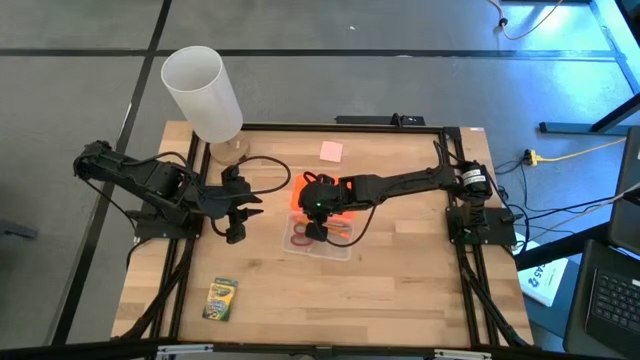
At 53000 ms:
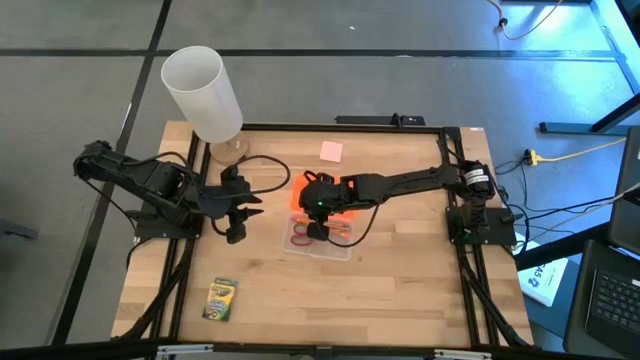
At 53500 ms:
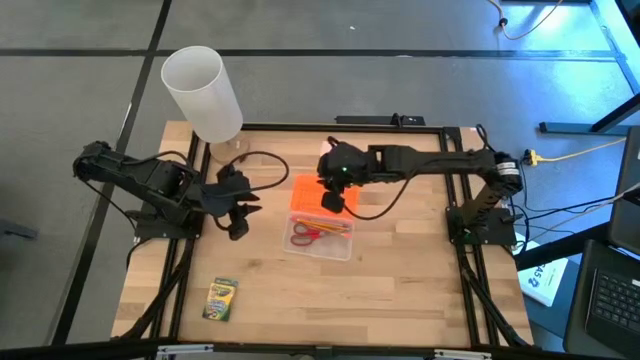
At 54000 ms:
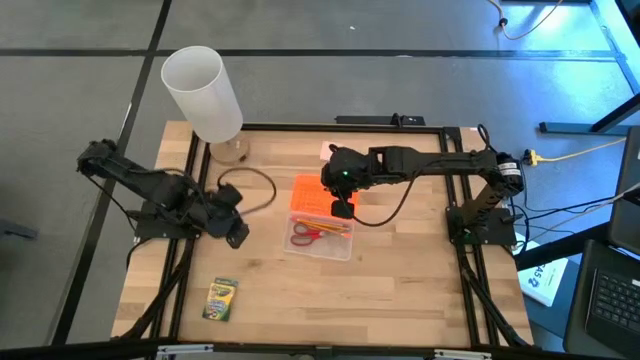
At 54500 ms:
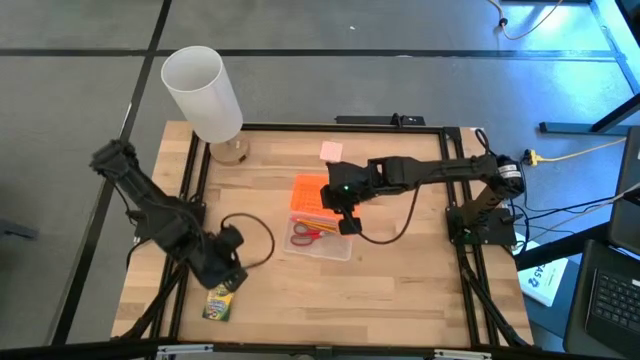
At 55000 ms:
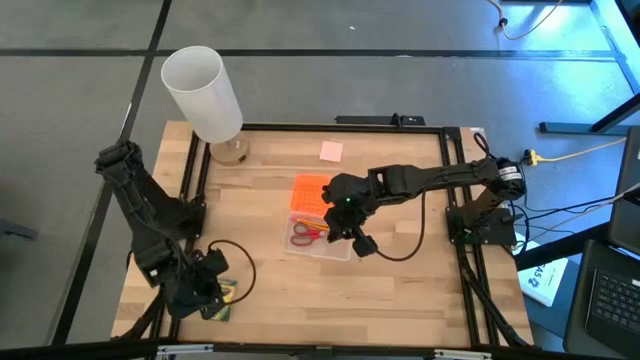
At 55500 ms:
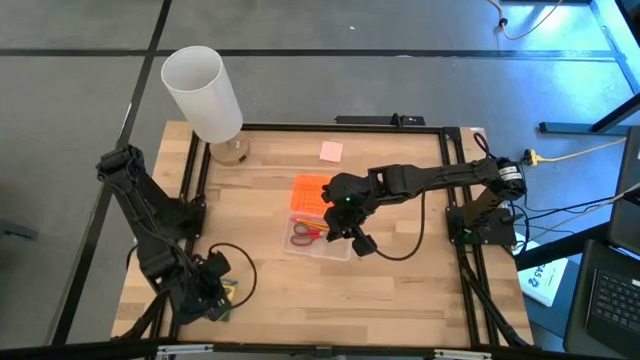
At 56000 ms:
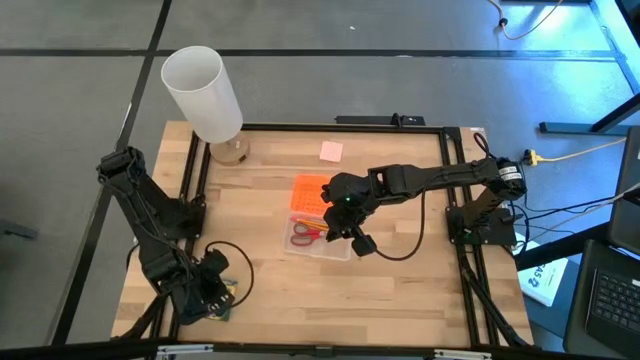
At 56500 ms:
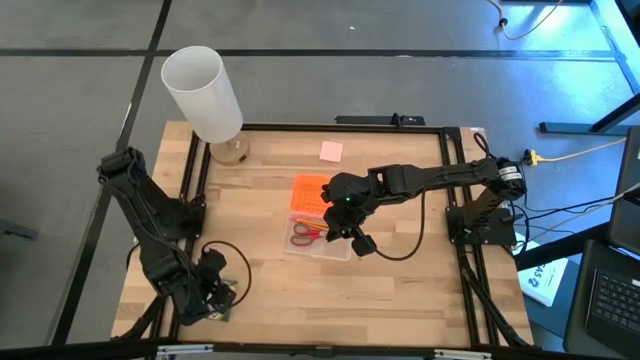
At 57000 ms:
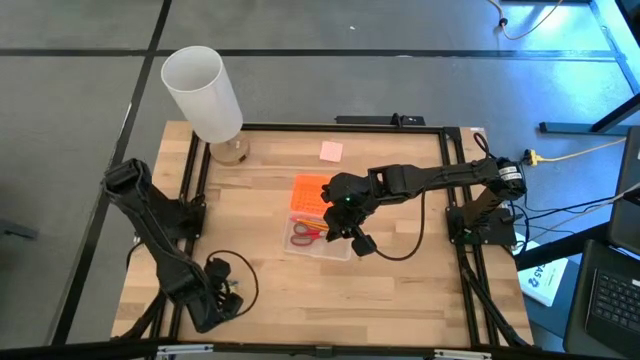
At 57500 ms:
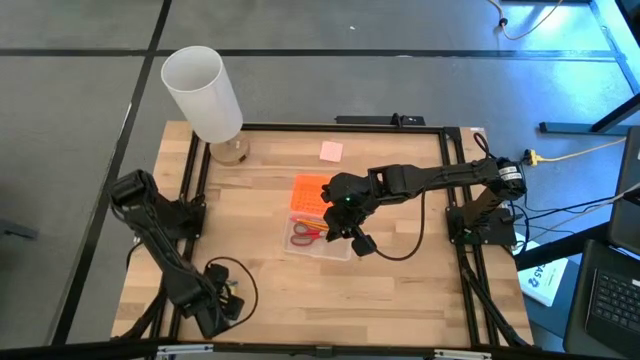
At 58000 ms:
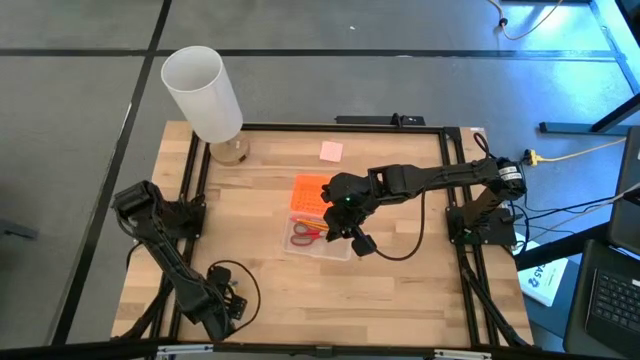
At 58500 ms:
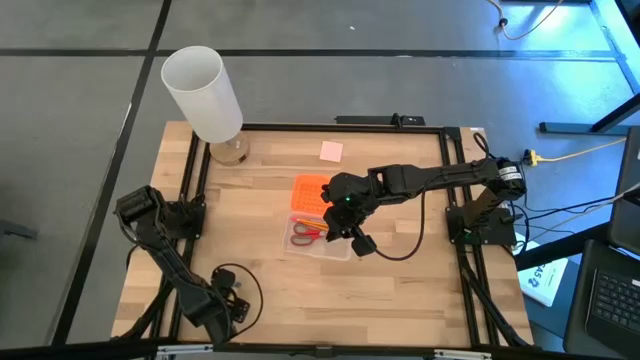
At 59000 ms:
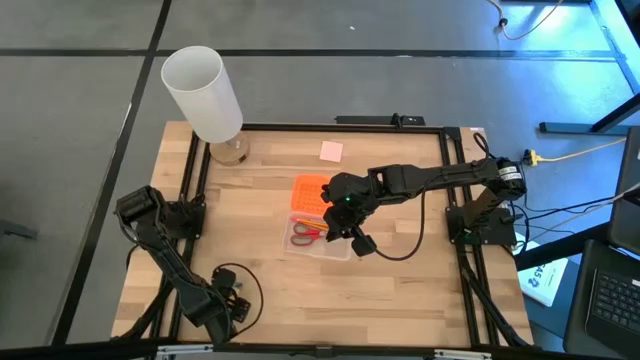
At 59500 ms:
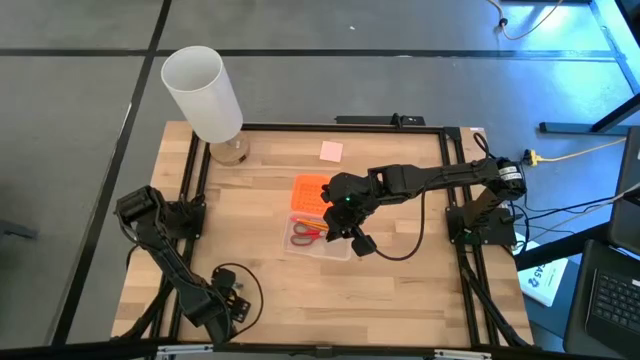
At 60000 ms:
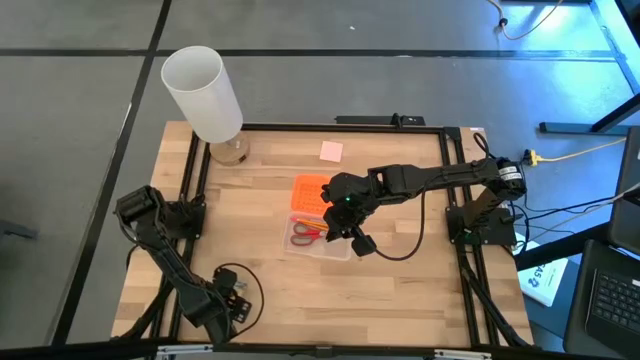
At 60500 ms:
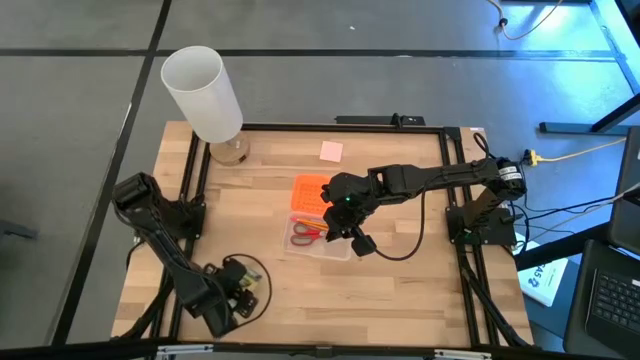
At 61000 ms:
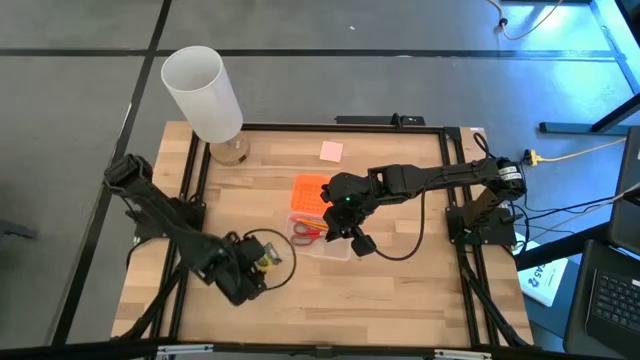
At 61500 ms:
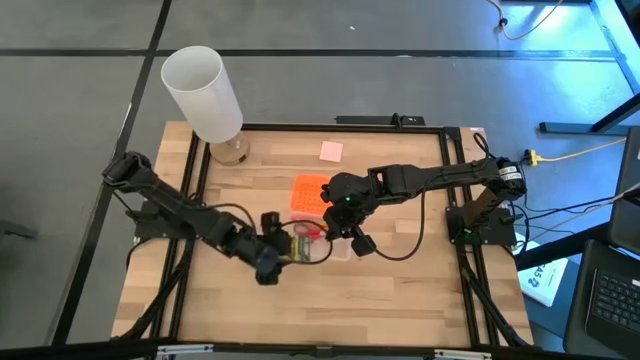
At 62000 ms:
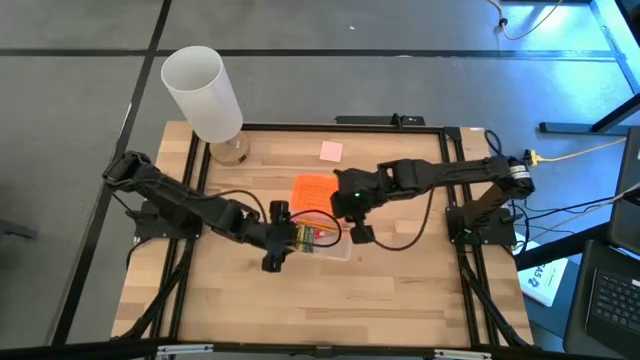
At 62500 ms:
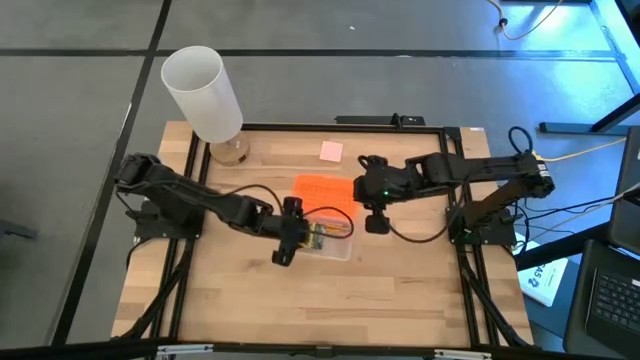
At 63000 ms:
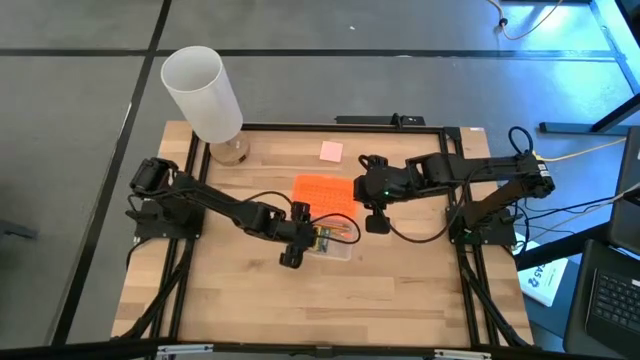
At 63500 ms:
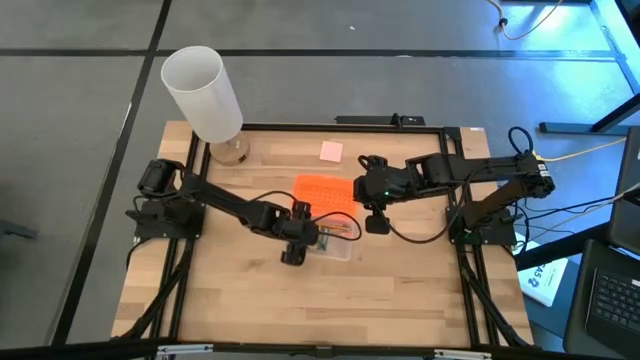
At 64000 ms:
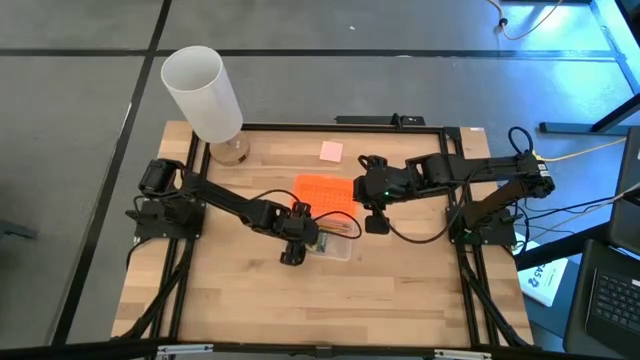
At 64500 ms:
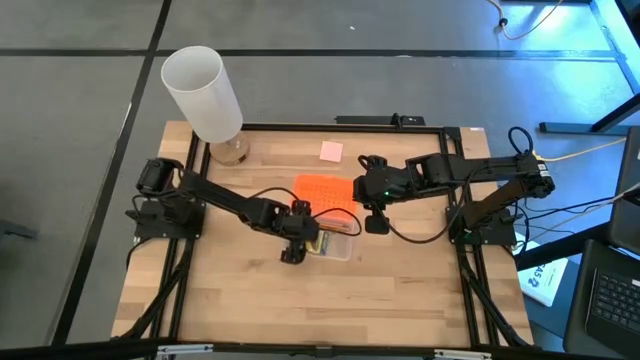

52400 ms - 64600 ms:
Task: Pack school essentials
Put the crayon box into the orange supply box

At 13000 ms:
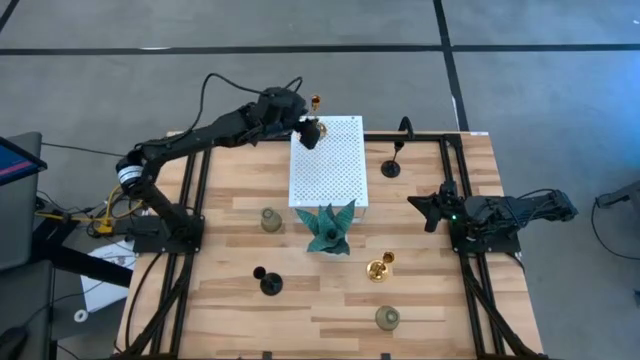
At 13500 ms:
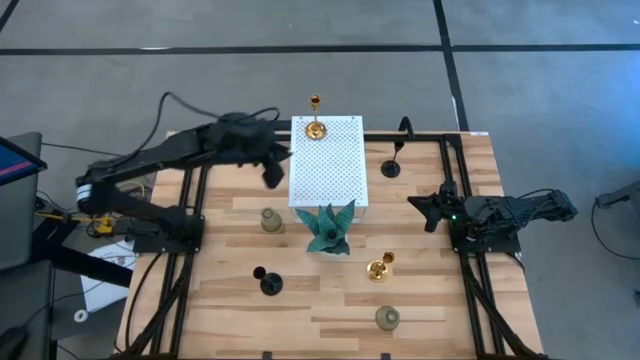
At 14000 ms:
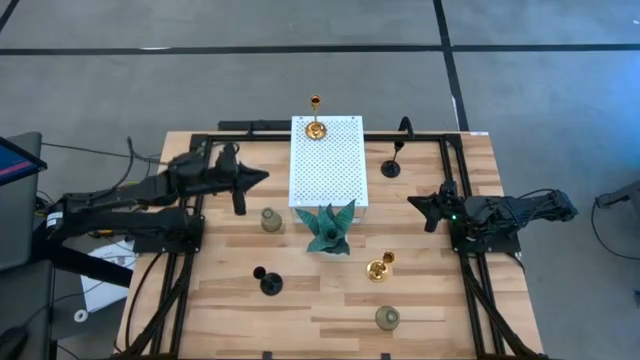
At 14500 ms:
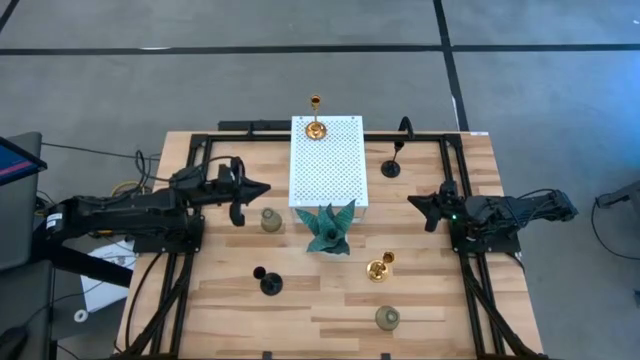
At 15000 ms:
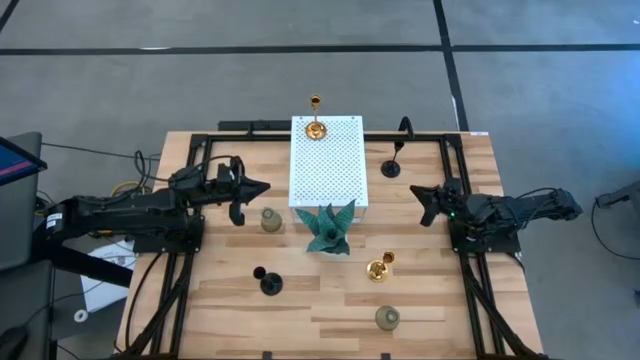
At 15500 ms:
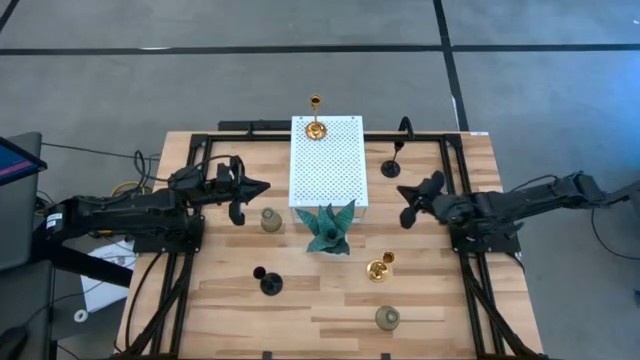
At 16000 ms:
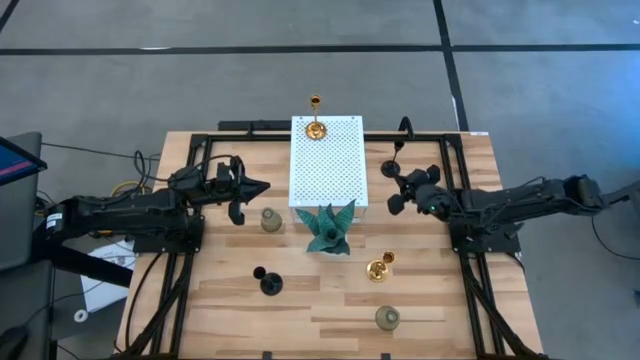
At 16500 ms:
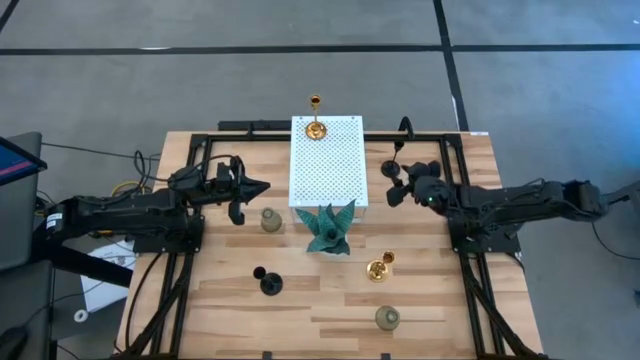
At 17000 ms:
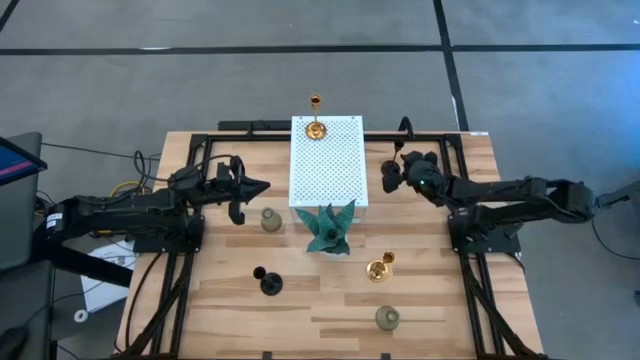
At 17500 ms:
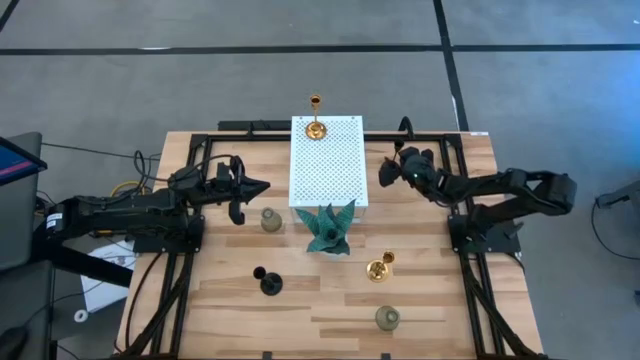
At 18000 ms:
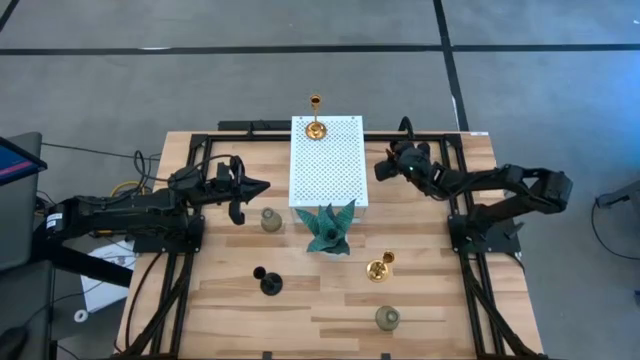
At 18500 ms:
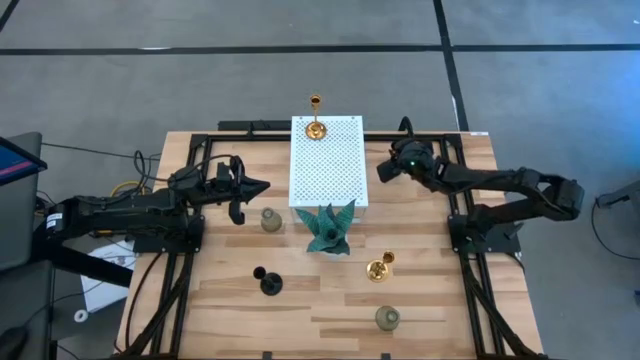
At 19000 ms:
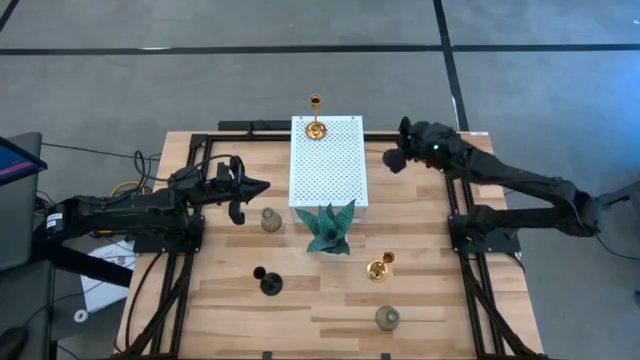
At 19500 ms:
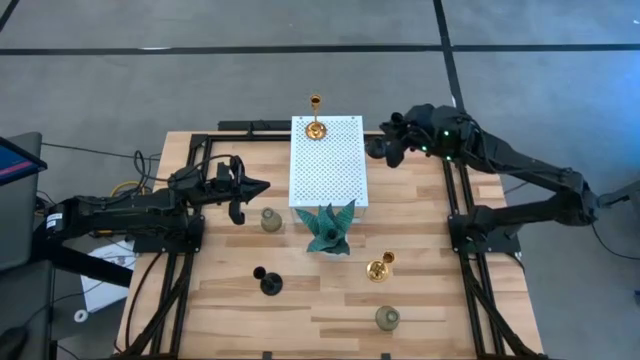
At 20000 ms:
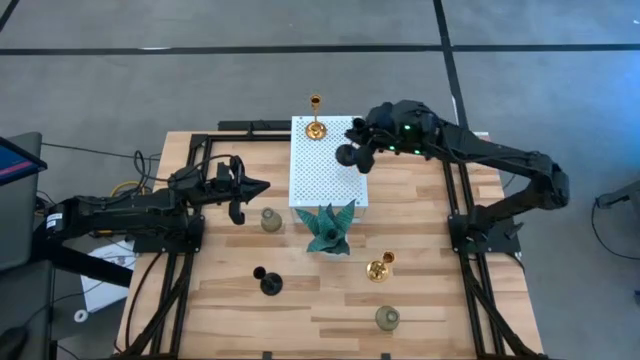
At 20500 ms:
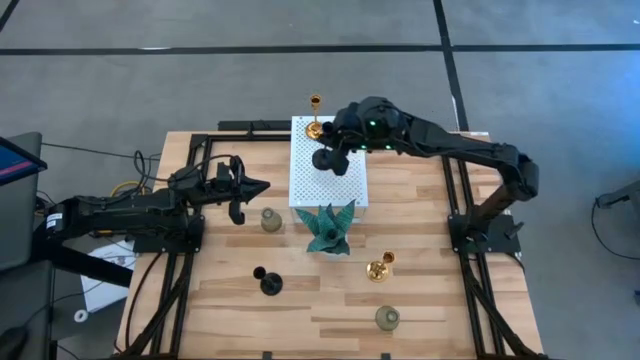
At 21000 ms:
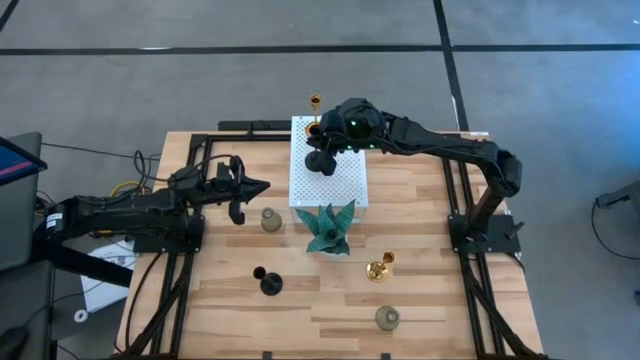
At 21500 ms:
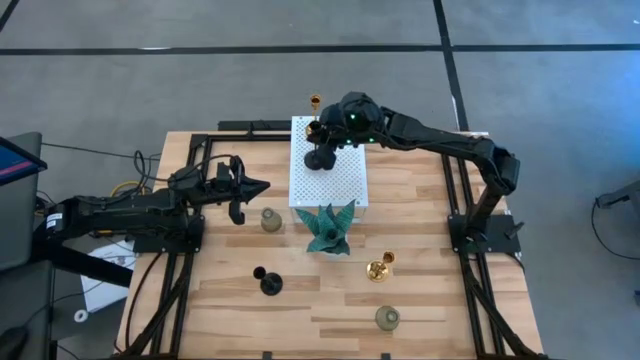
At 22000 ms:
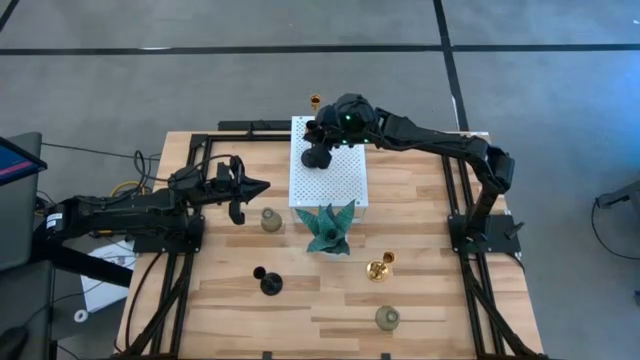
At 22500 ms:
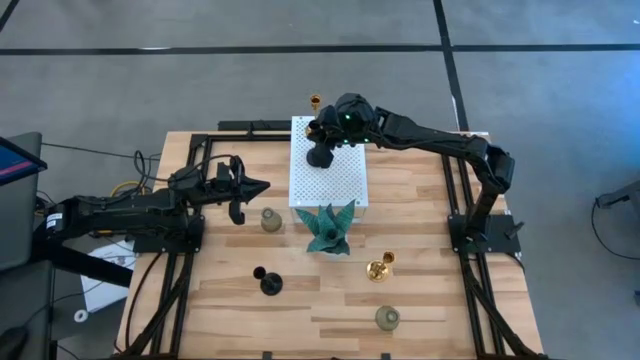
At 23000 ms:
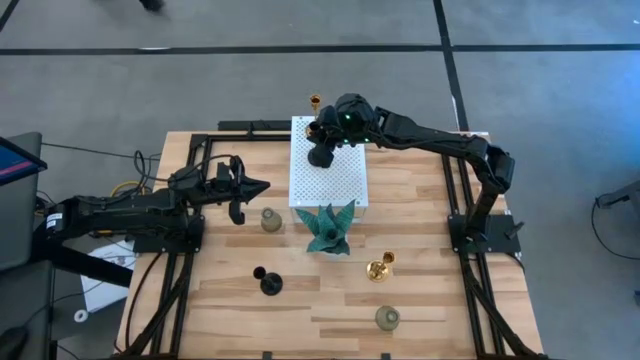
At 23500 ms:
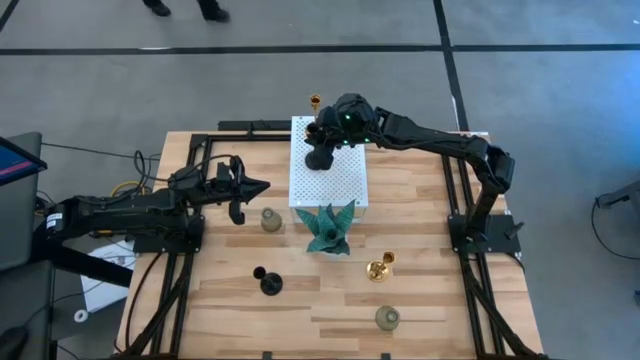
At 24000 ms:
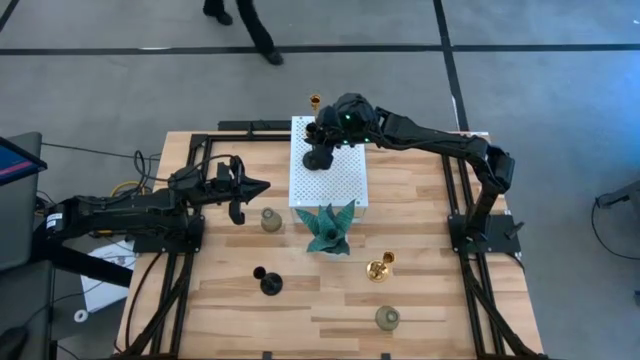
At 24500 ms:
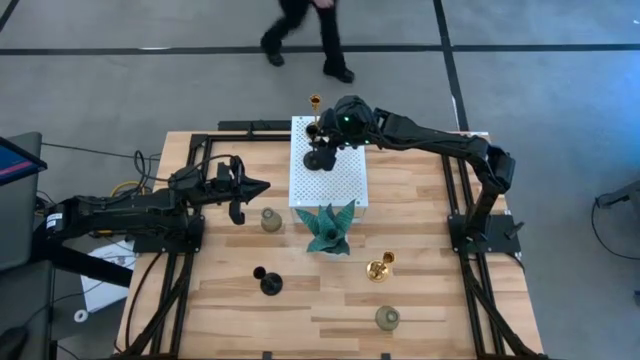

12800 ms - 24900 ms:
Task: Pick & Place candle stick holders
Put the top black candle holder on the shelf
